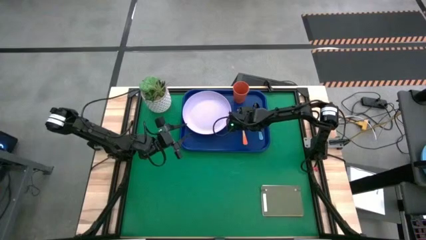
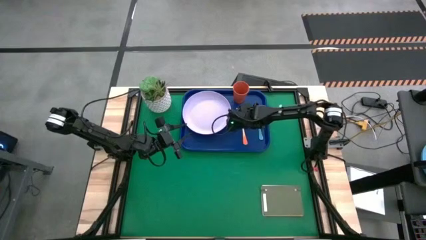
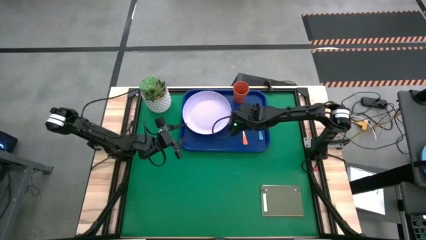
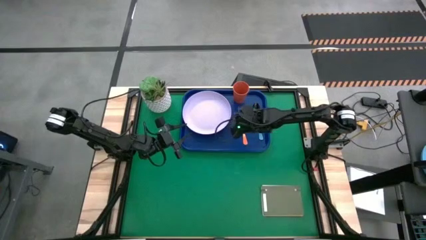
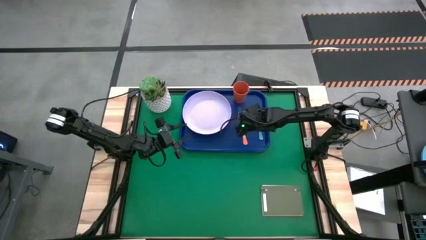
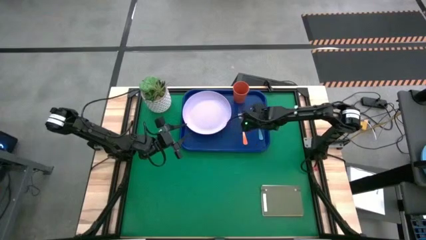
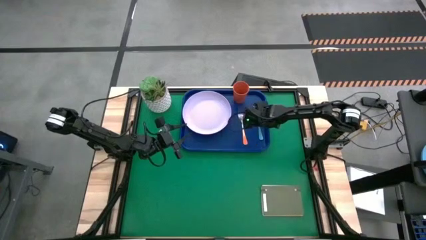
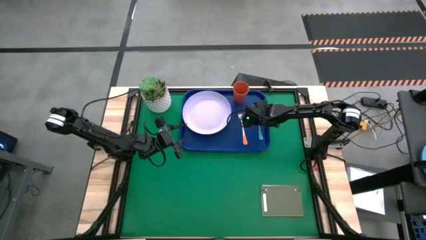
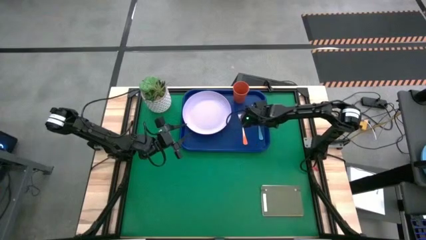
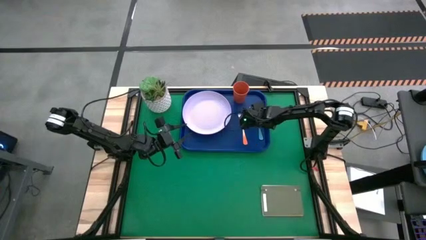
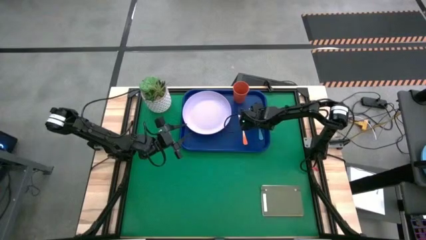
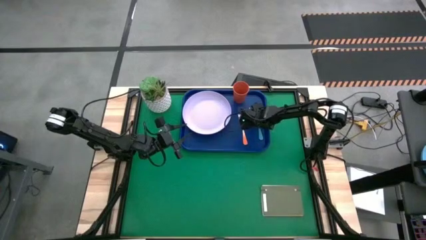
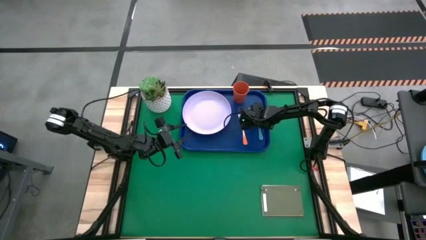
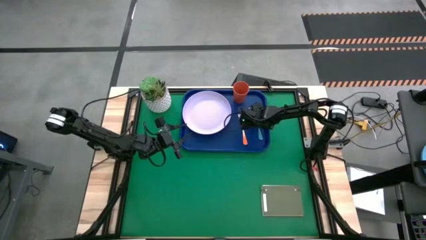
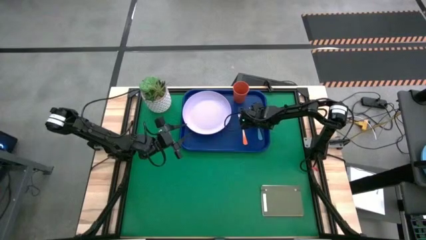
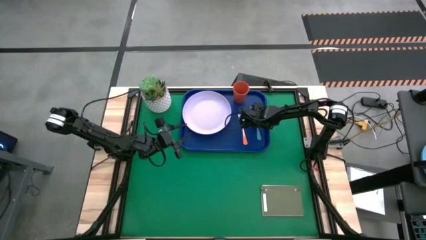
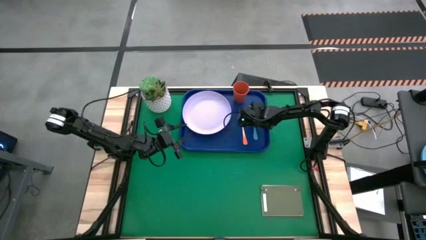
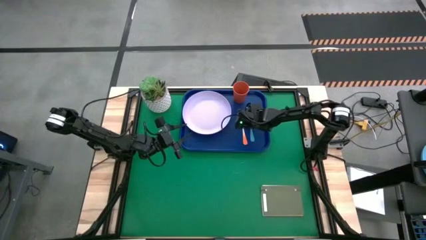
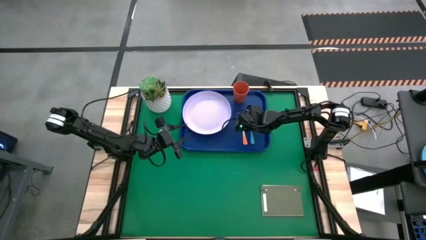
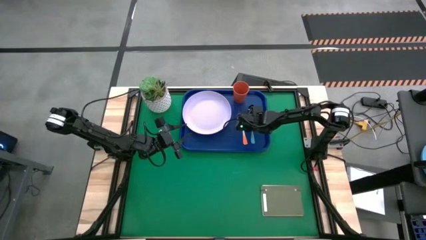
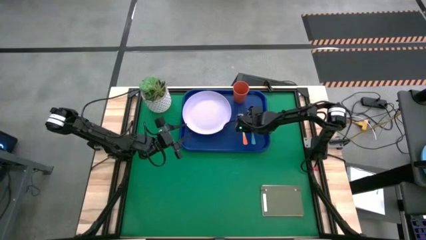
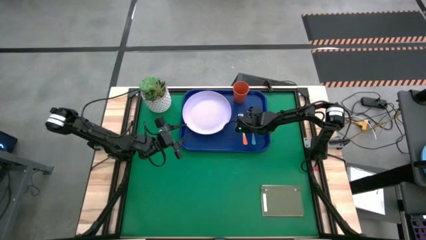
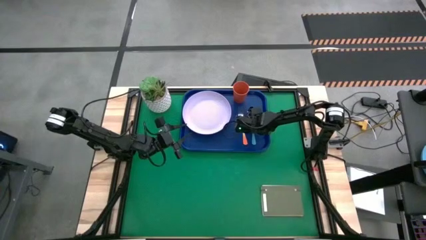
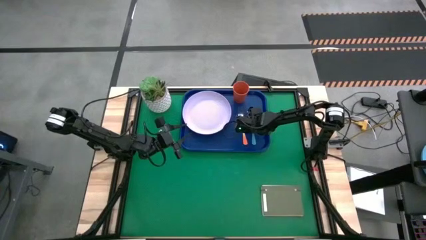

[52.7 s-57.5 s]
Task: Pick and place plate/cup/fork/spoon on tray
Adjust the blue spoon on the blue serving tray

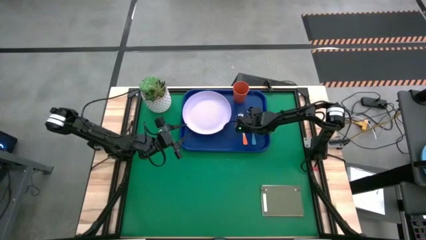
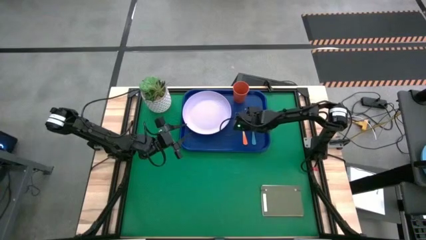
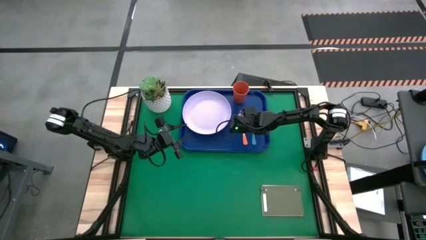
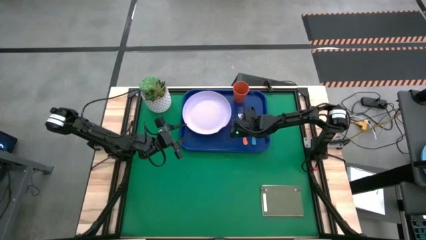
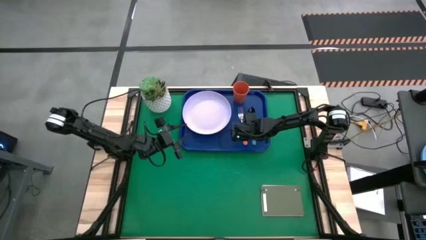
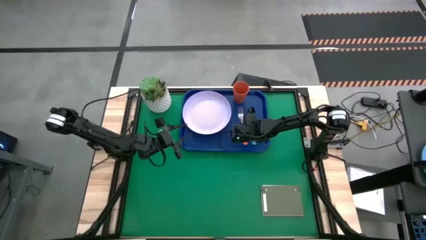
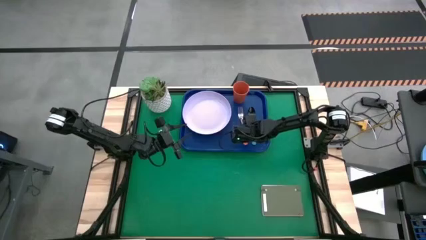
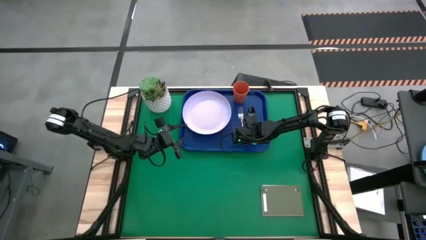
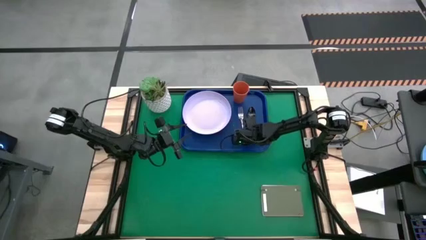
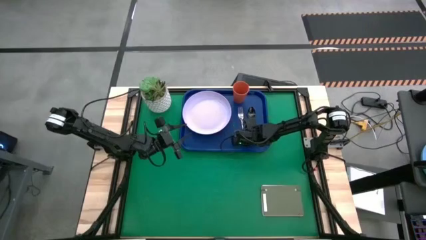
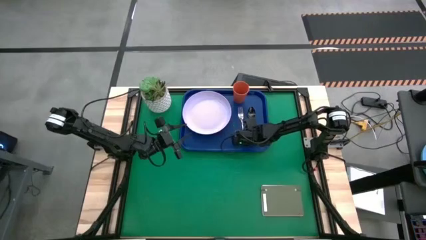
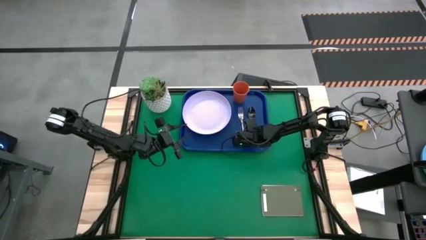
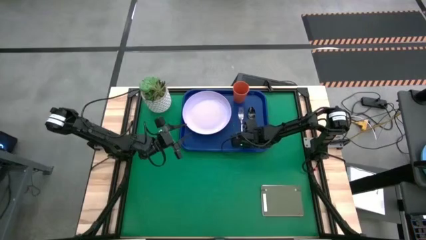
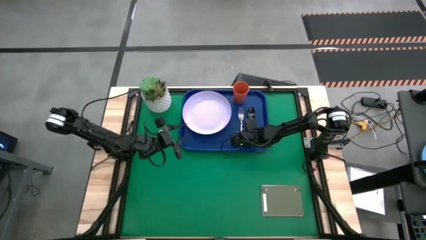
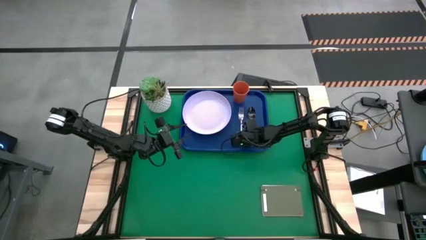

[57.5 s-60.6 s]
Adjust the orange fork on the blue serving tray

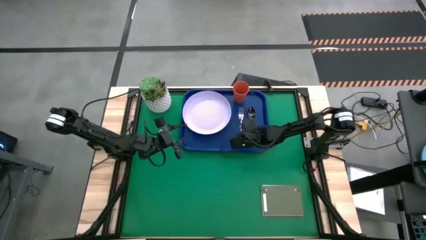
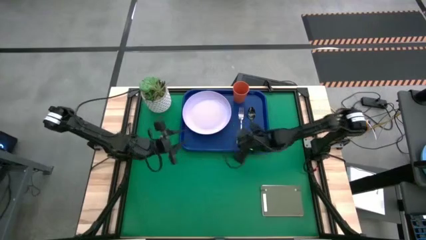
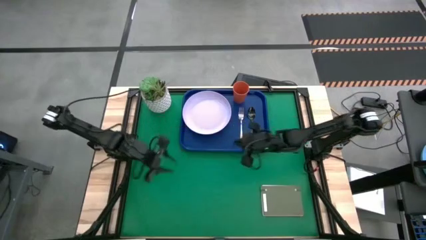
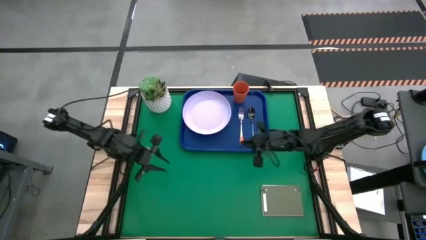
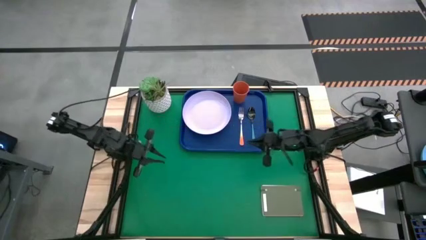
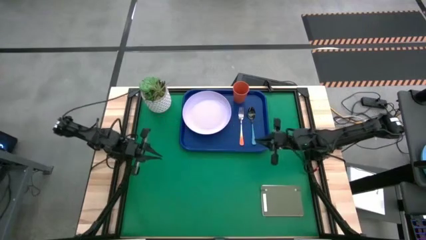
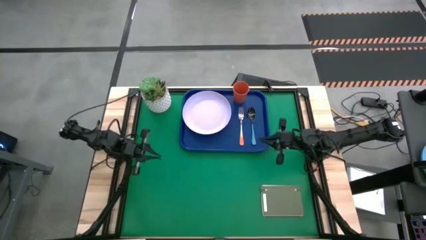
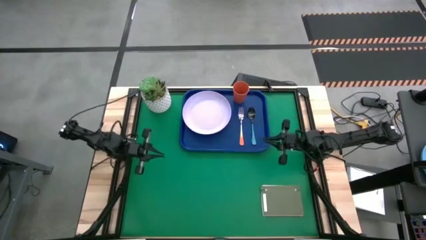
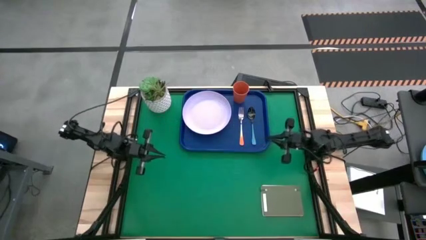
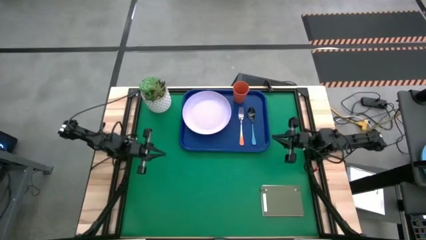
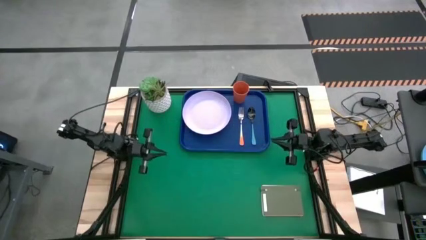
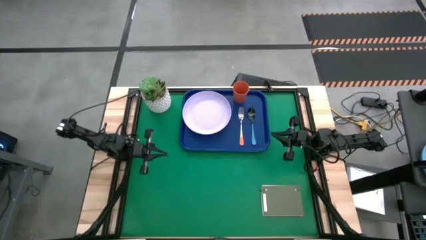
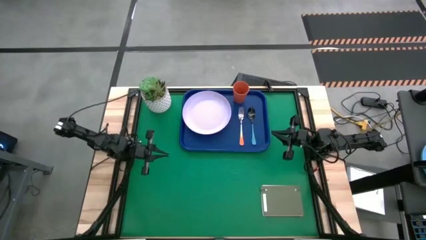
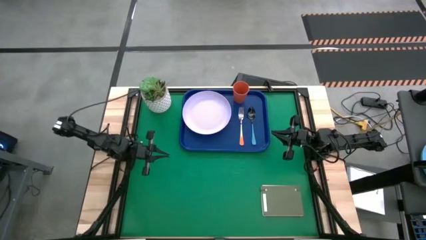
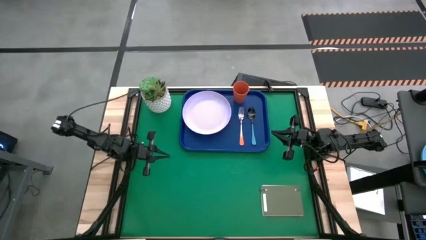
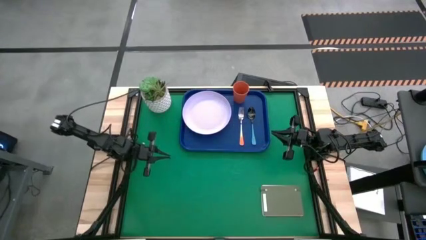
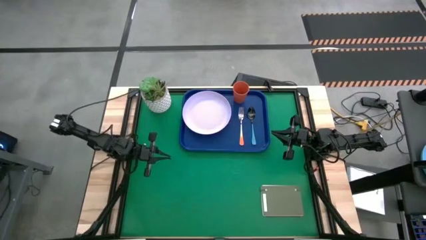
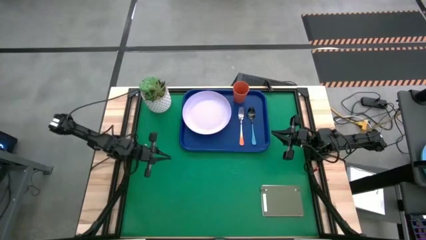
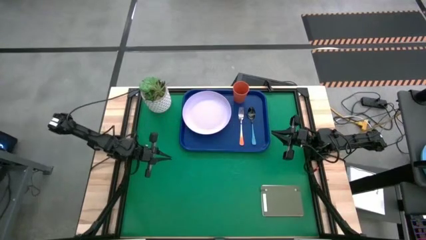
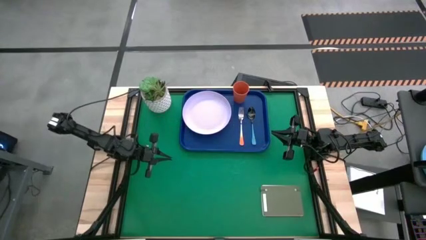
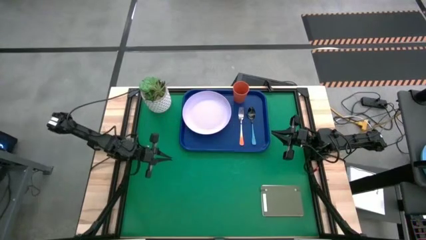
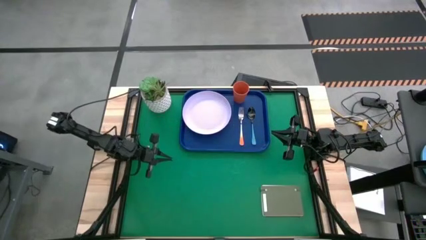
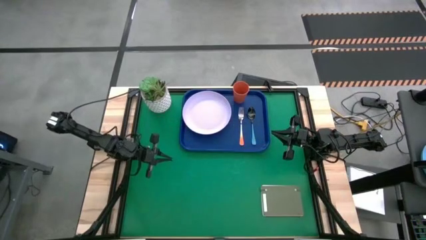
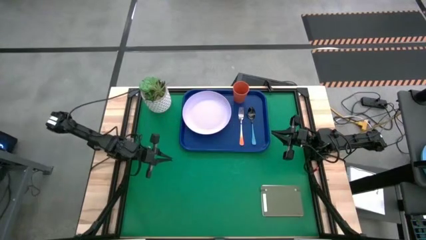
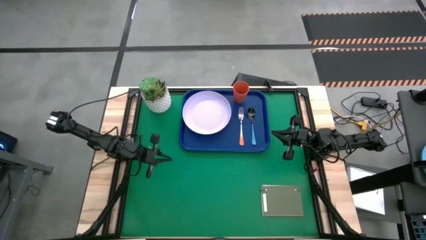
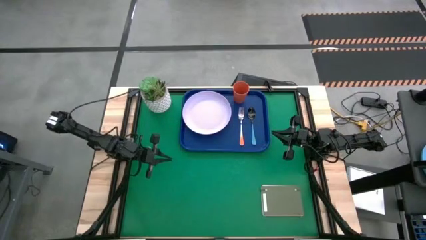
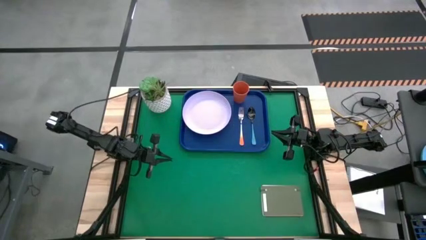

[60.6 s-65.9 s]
Return to Home Position

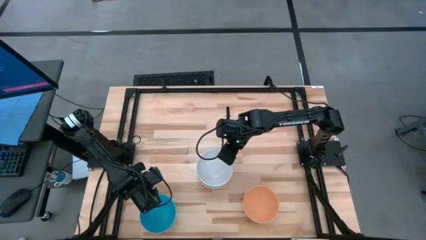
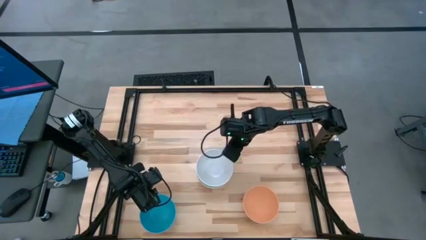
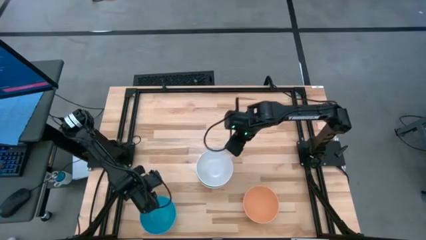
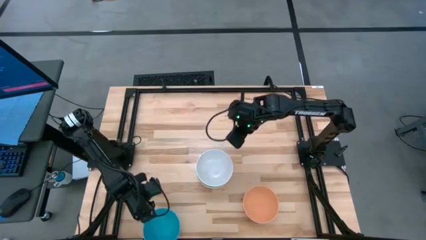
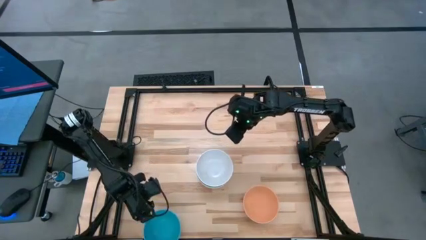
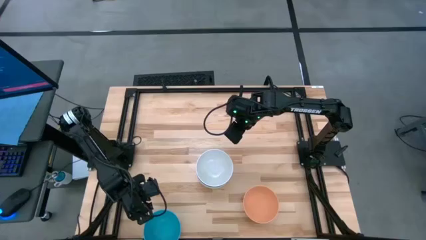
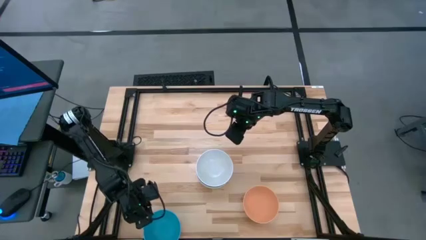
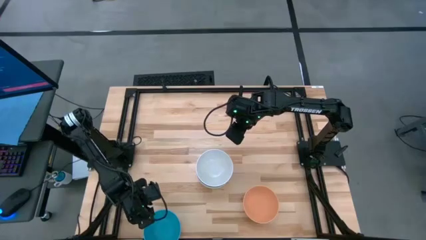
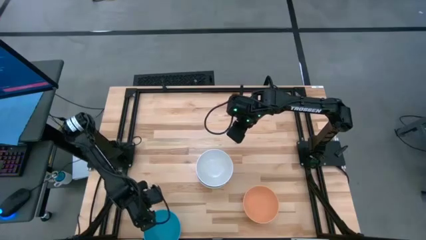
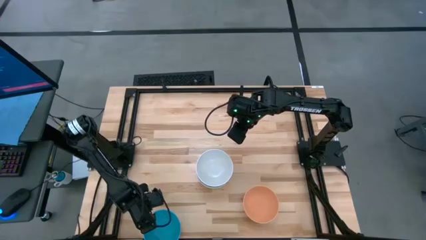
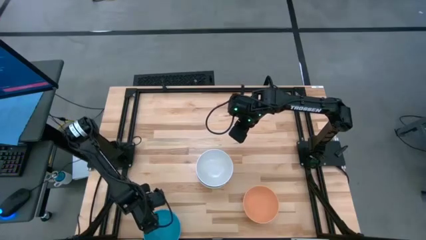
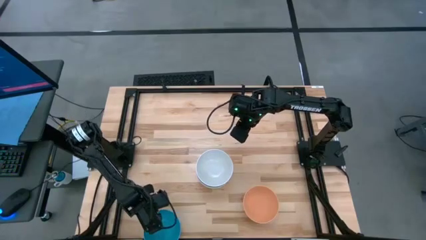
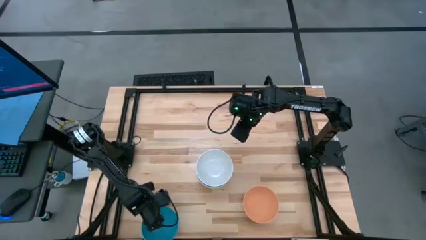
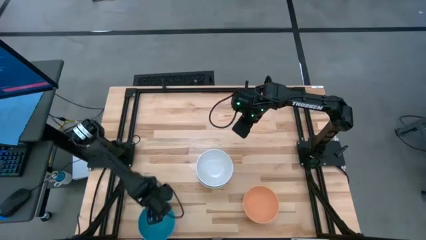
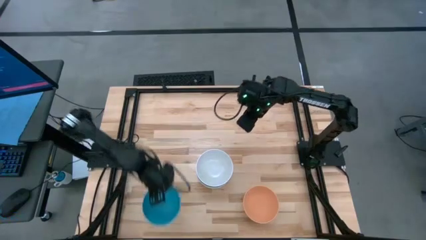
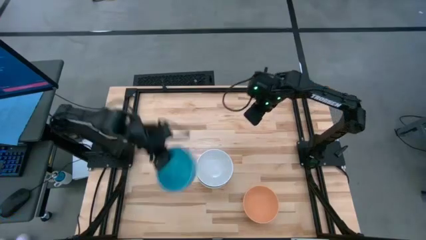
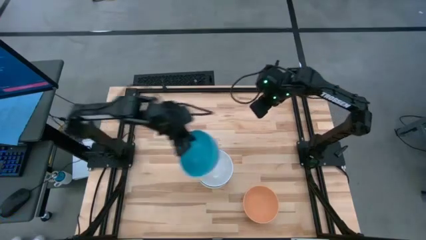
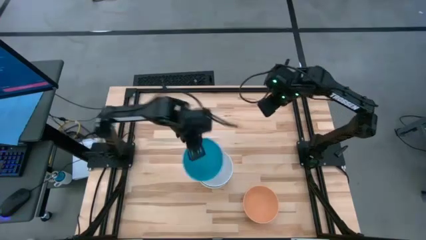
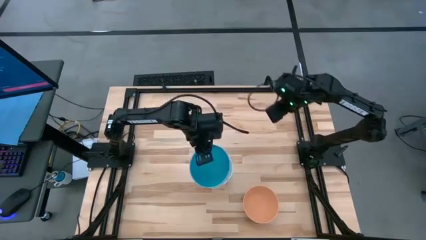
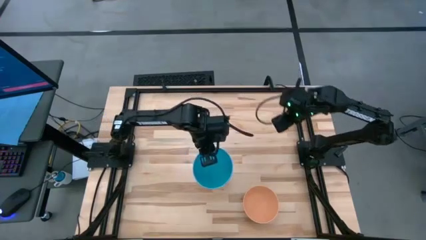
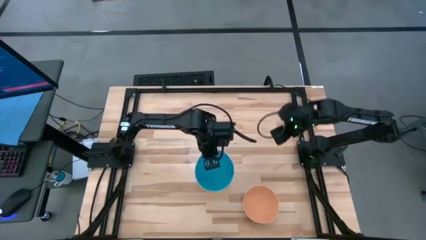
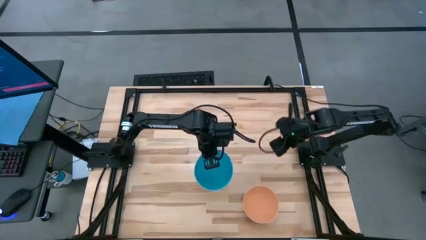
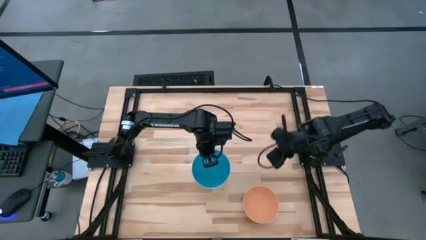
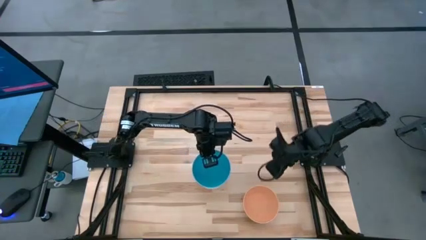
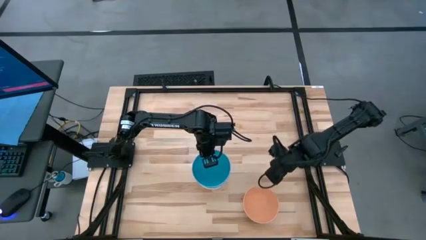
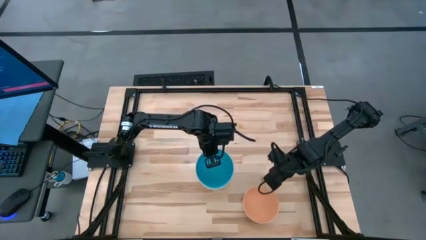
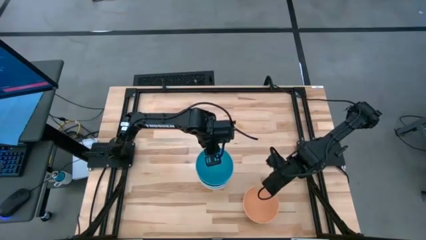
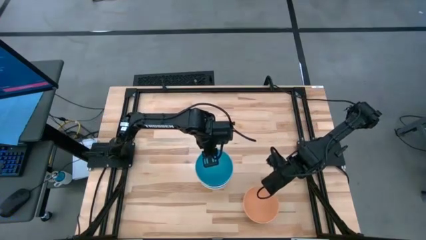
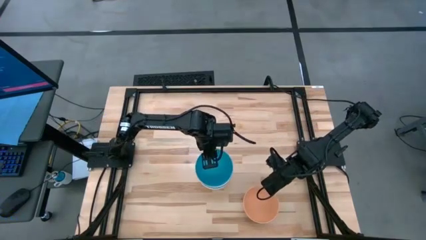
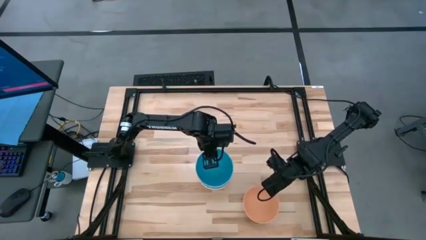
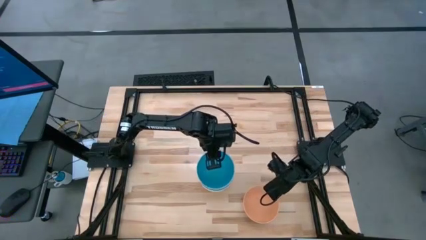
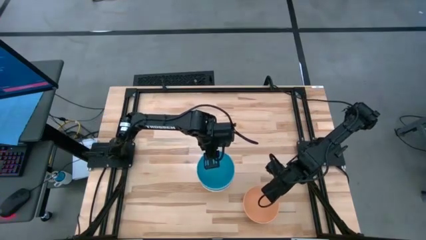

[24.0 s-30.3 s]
Task: Nest bowls inside each other
Stack the blue bowl on top of the white bowl
